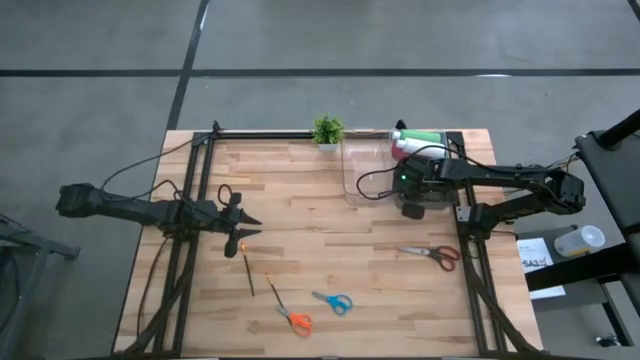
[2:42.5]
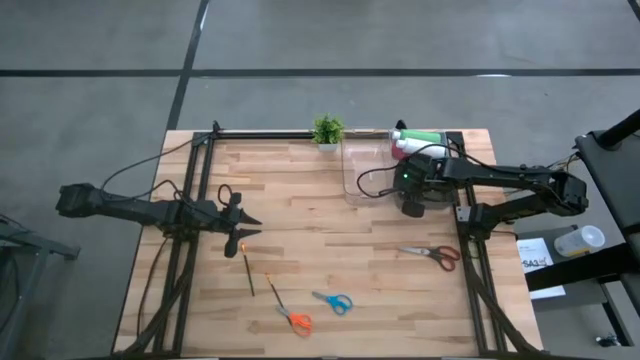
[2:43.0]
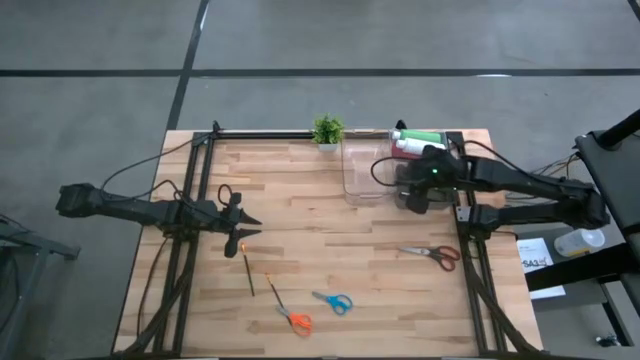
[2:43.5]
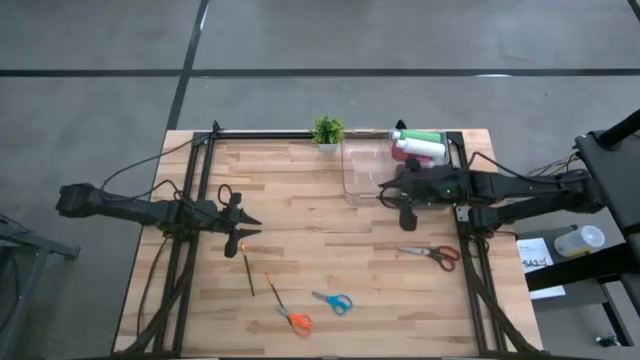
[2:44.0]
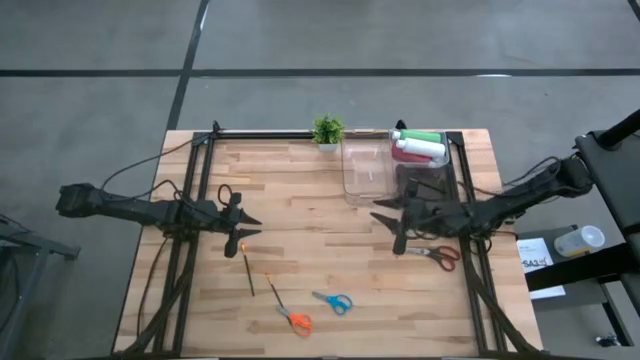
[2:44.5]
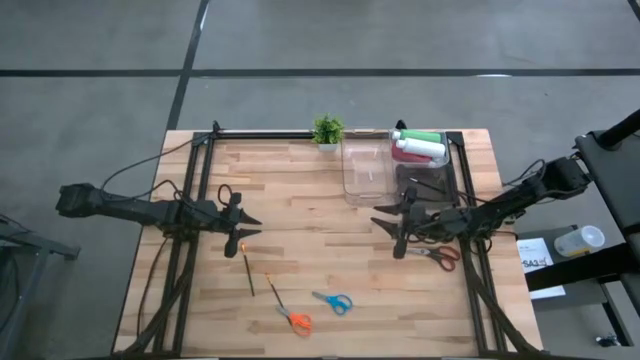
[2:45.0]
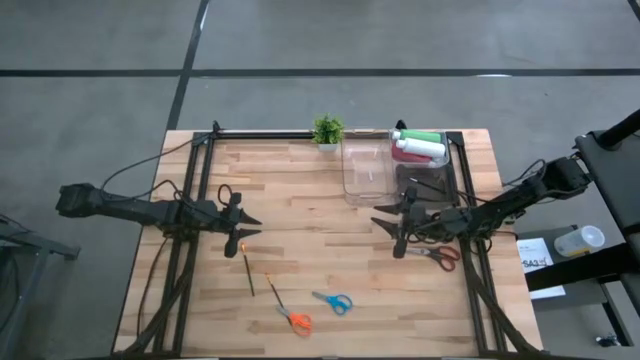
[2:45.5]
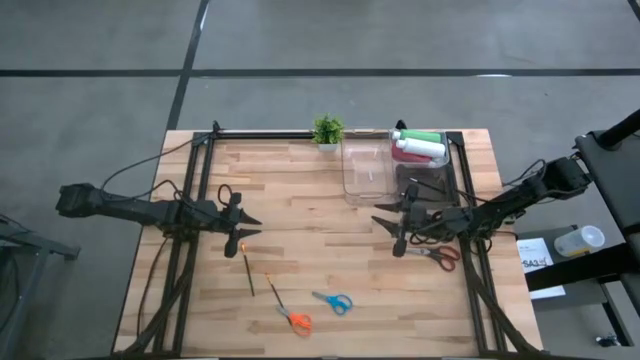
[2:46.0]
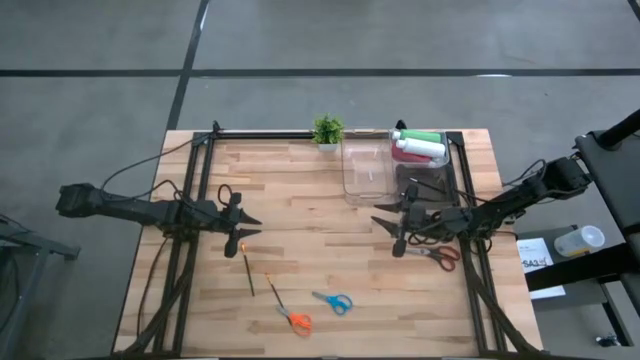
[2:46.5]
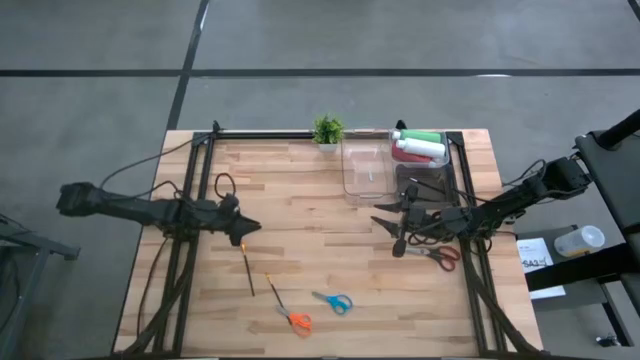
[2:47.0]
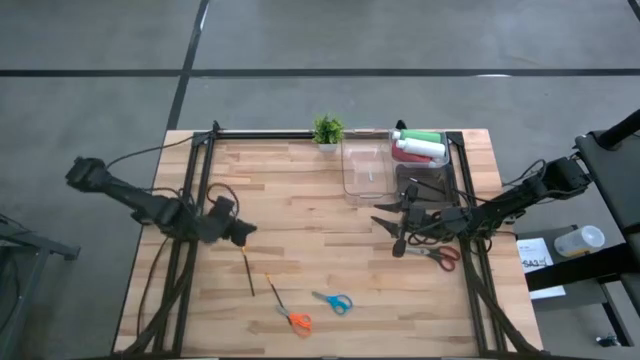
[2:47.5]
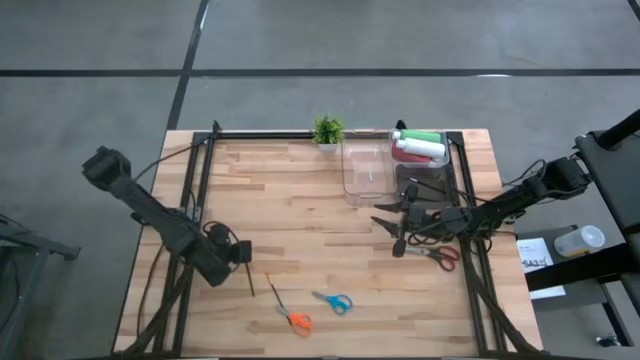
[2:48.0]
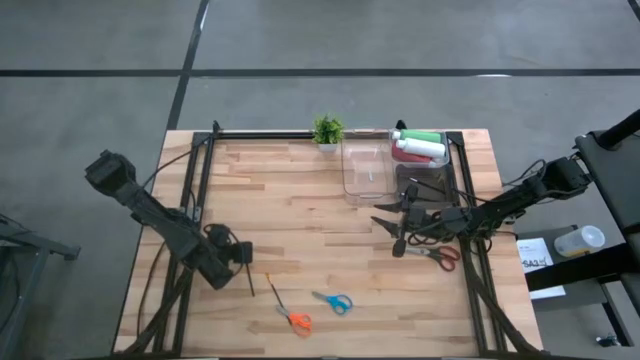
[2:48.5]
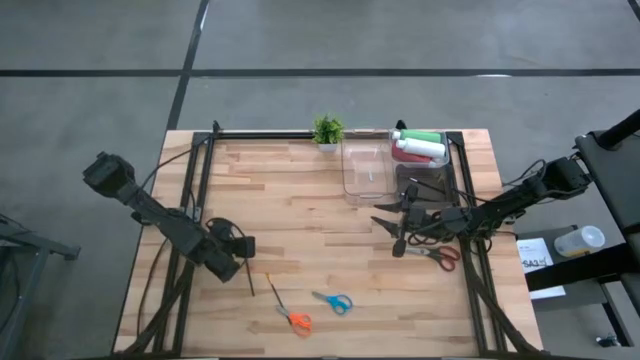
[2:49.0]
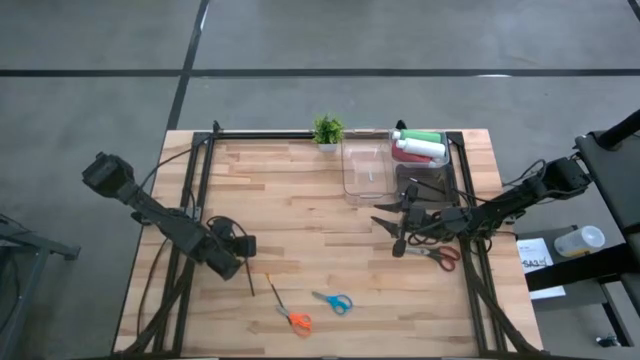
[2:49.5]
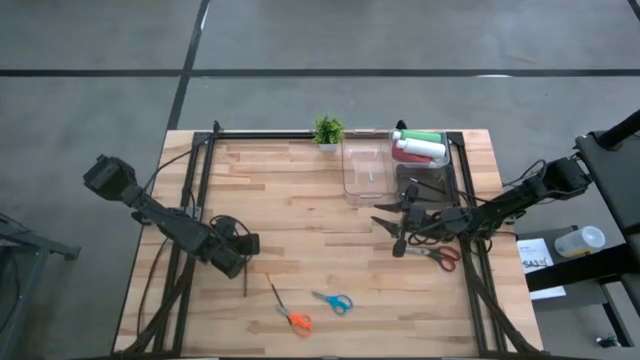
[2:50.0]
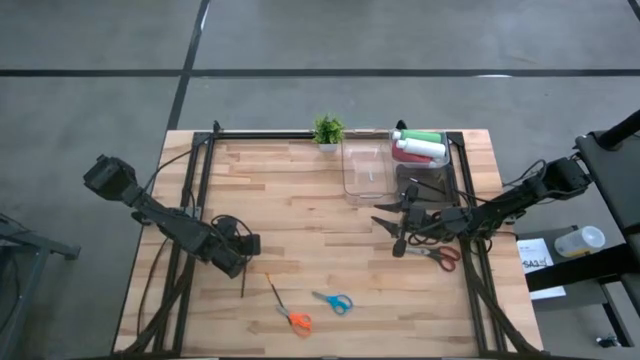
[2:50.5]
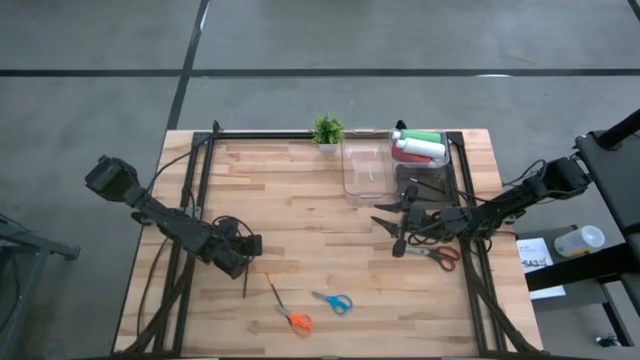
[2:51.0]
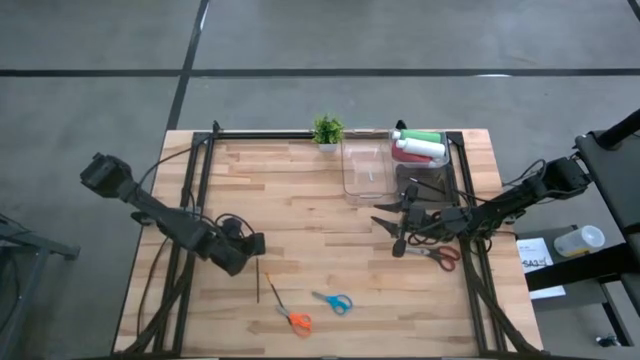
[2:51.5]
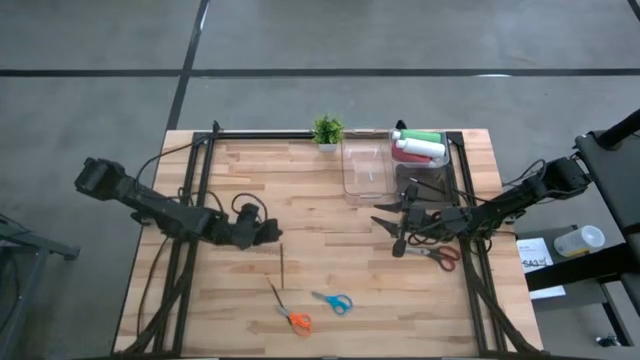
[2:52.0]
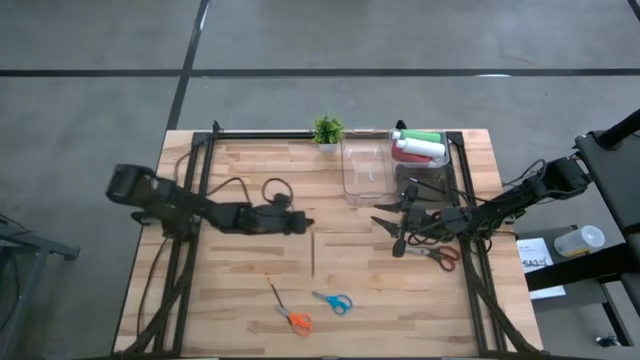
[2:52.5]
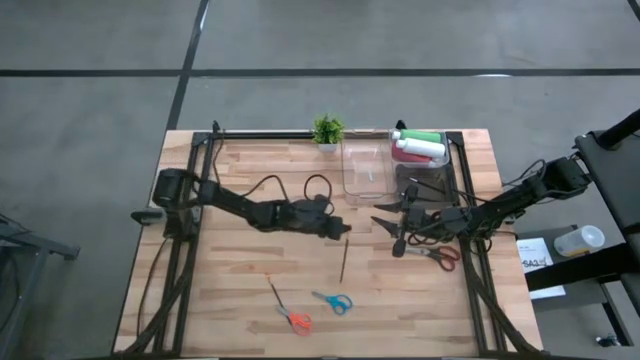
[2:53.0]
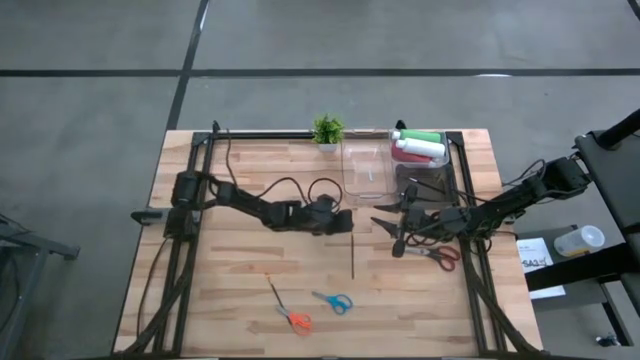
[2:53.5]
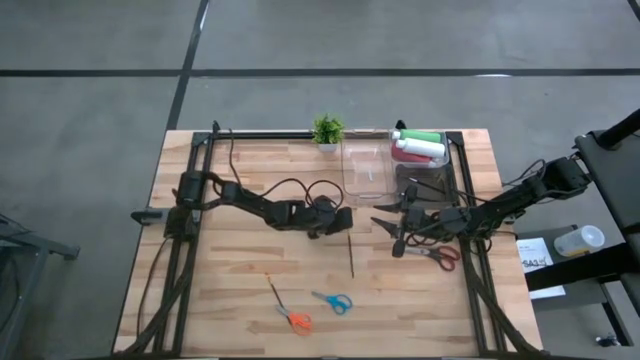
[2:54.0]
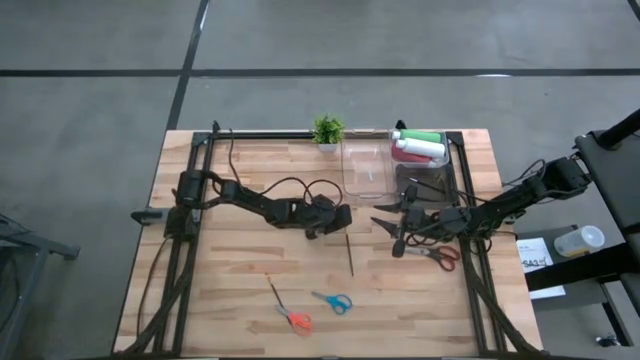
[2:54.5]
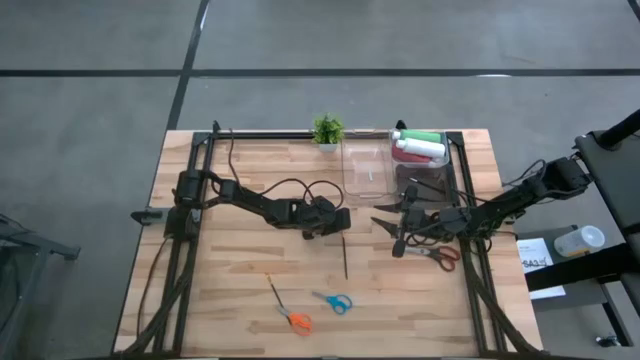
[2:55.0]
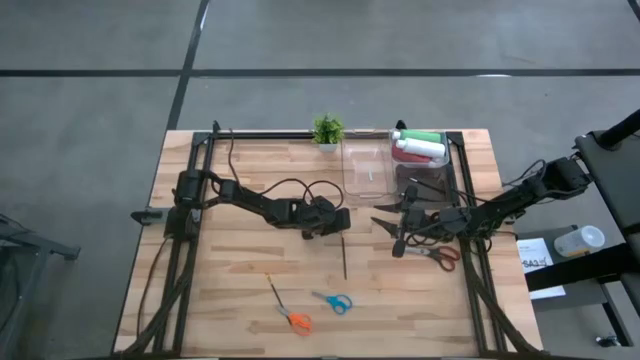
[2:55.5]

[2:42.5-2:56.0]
Task: Pick & Place Paint Supplies
Put the left gold paintbrush into the black bin

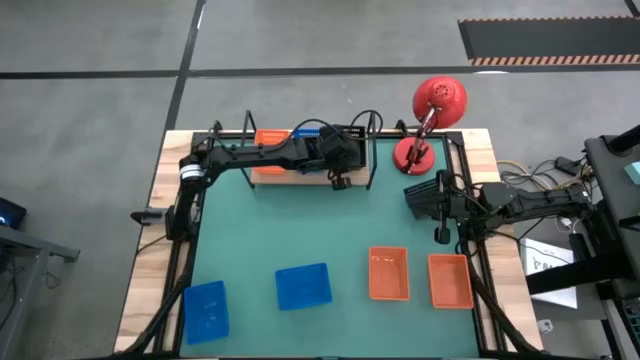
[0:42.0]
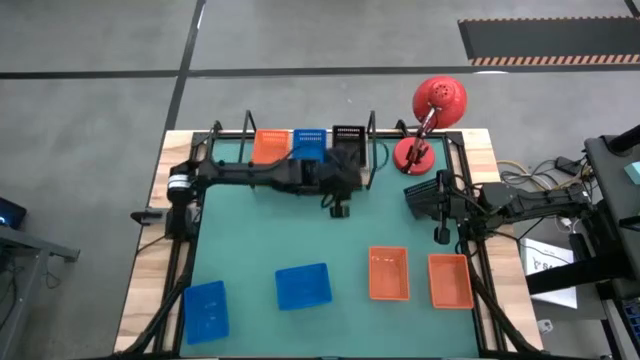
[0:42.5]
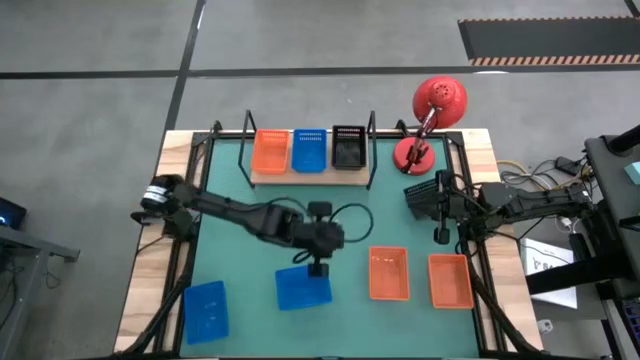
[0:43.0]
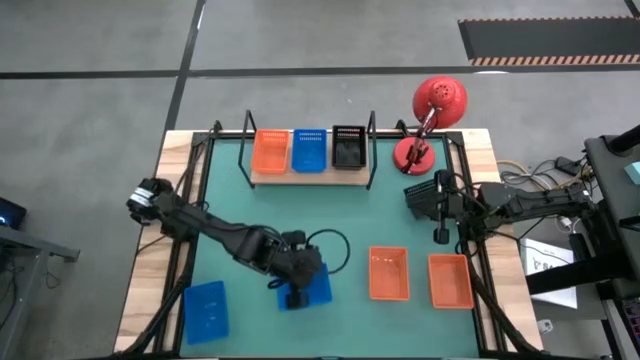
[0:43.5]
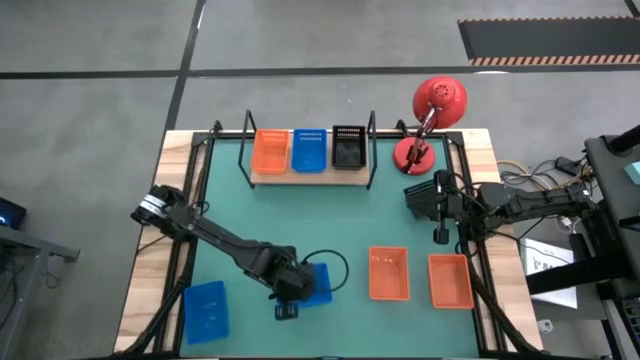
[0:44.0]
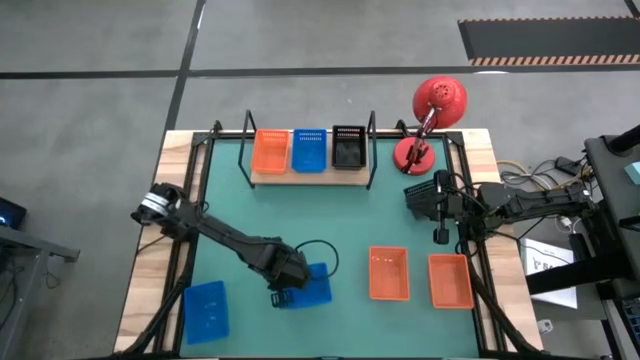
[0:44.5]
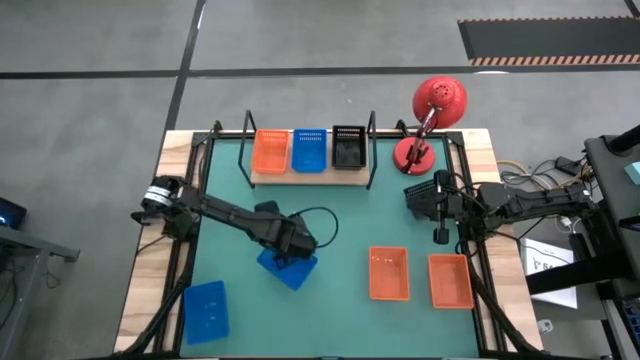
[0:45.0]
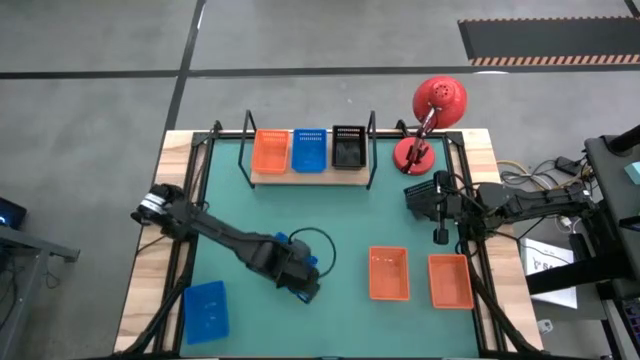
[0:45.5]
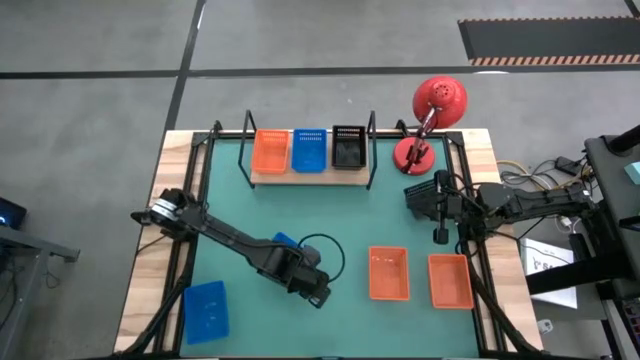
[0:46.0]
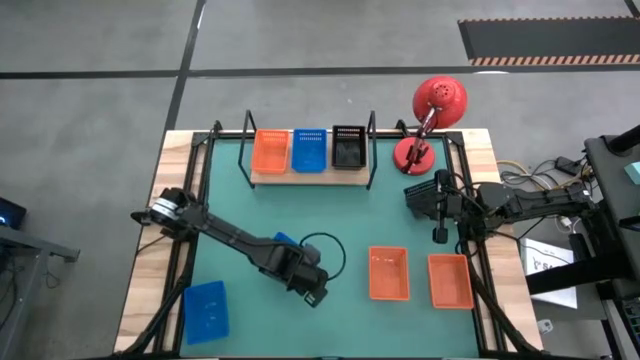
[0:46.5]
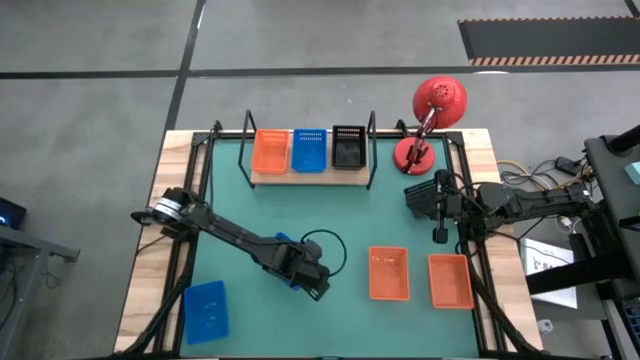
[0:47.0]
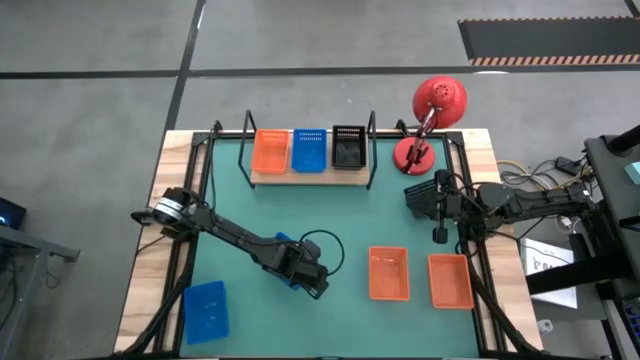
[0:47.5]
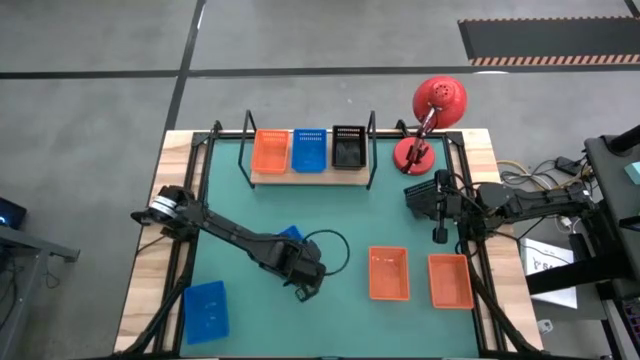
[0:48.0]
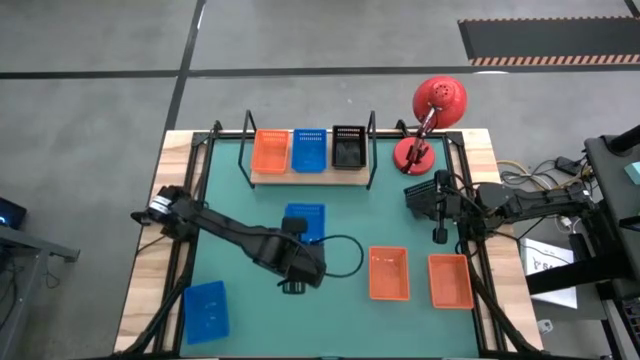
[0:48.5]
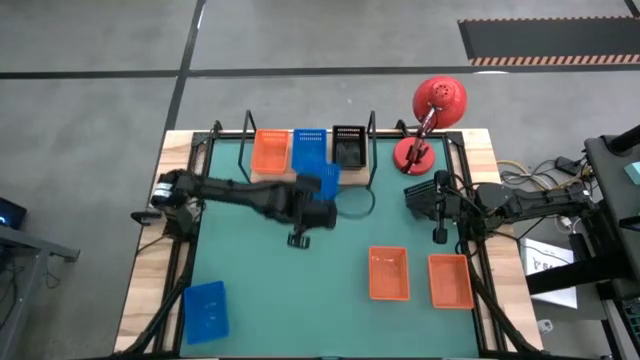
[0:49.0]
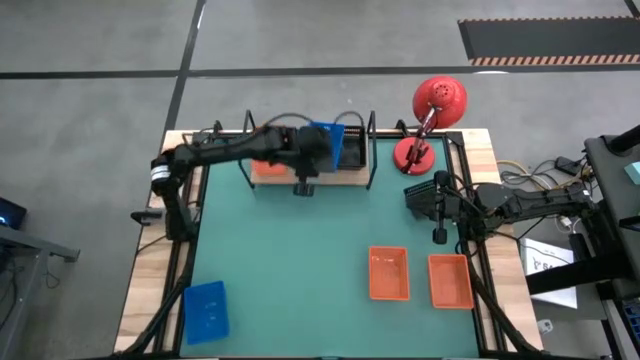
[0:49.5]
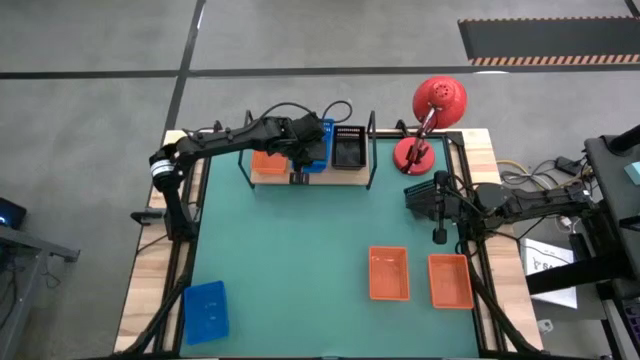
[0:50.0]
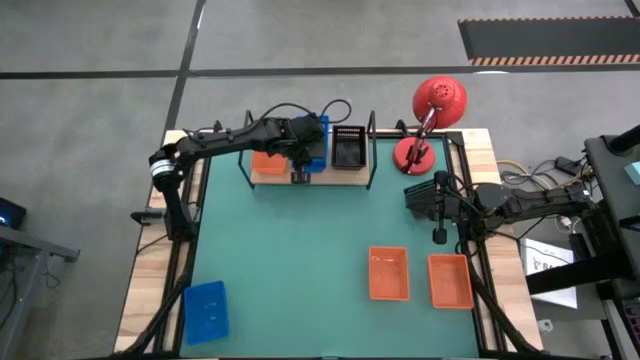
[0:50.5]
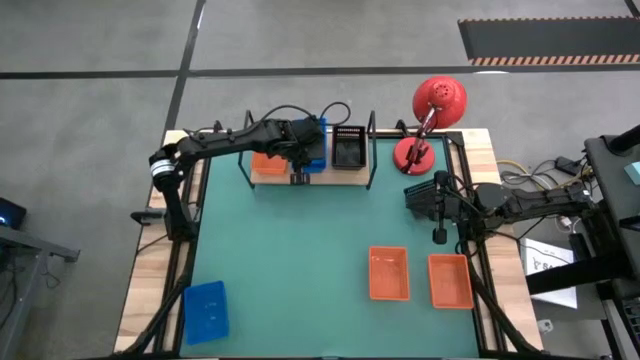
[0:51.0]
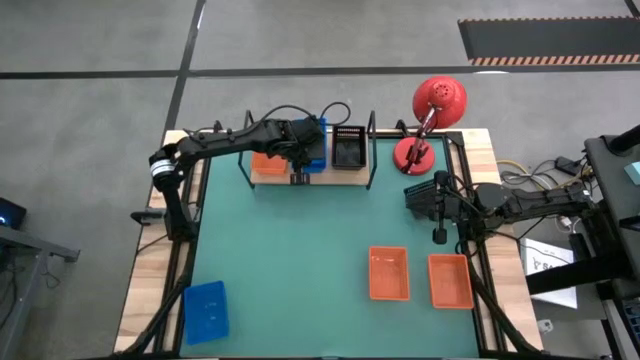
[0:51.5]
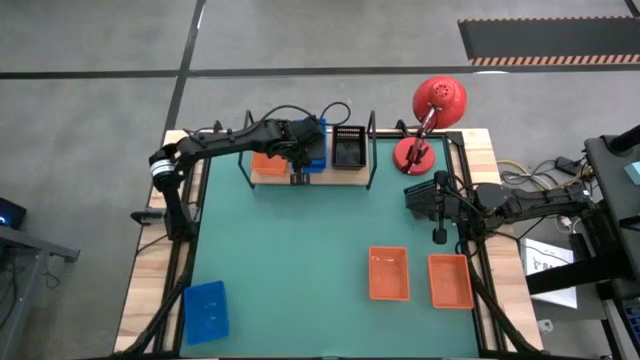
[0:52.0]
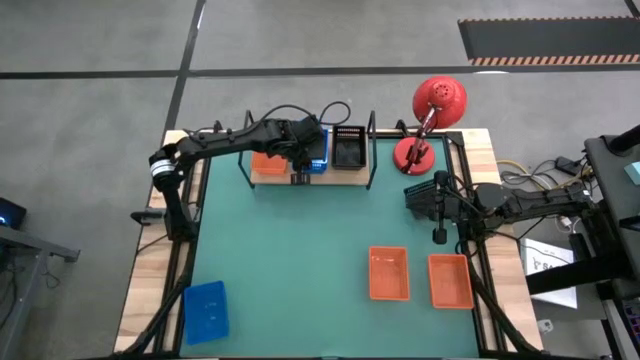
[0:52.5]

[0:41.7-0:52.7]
Task: Stack baskets on shelf by color
Stack the right blue basket on top of the blue basket on the shelf
